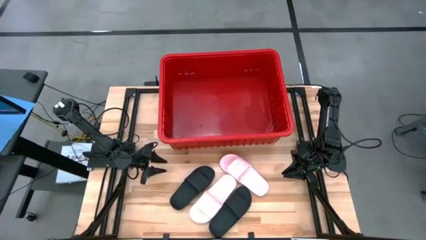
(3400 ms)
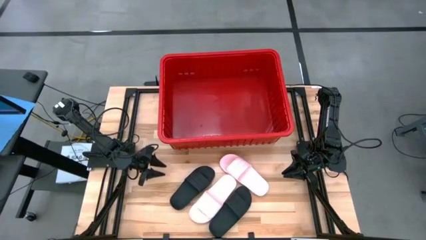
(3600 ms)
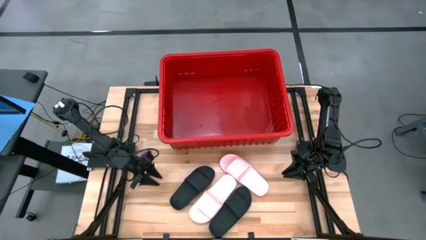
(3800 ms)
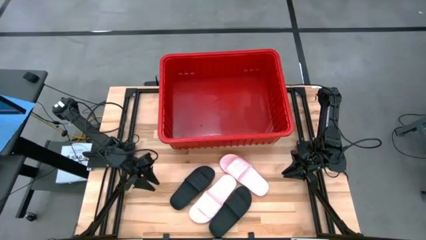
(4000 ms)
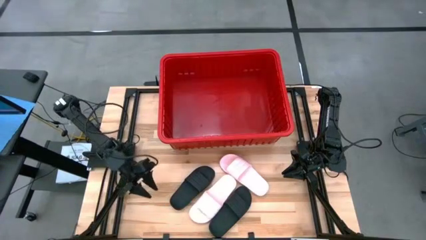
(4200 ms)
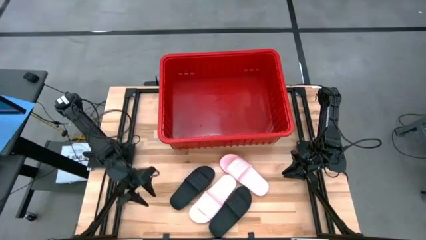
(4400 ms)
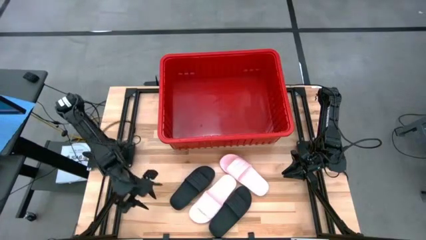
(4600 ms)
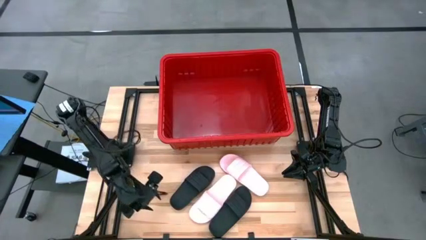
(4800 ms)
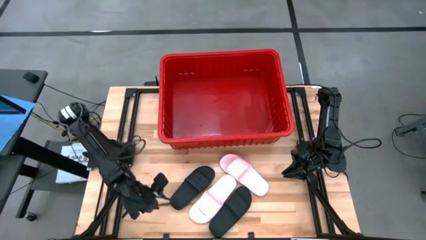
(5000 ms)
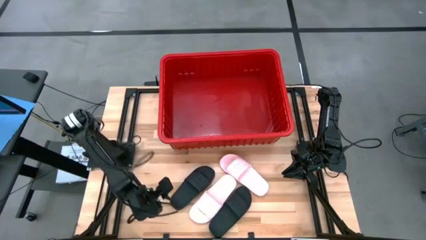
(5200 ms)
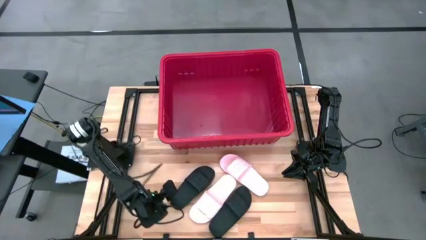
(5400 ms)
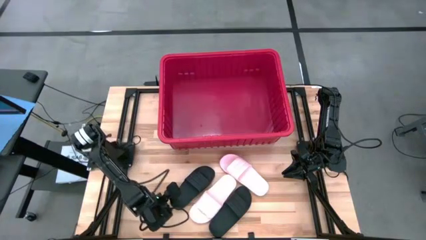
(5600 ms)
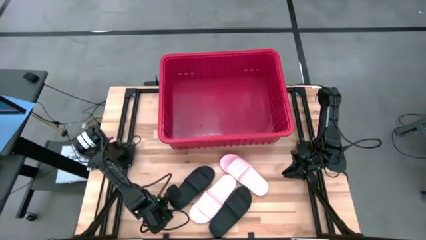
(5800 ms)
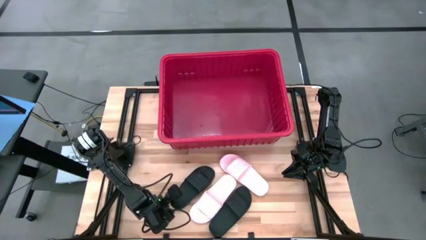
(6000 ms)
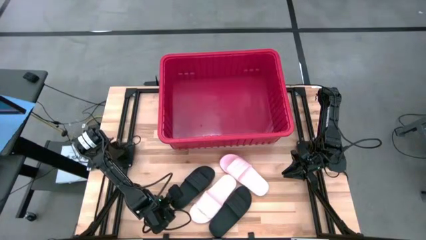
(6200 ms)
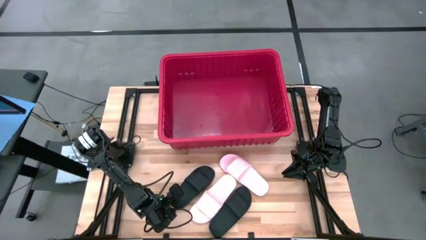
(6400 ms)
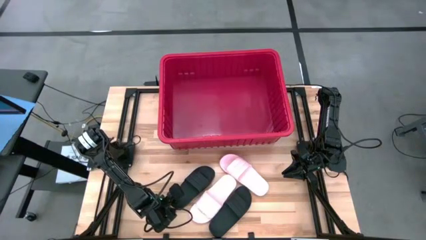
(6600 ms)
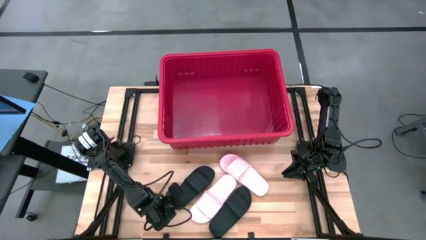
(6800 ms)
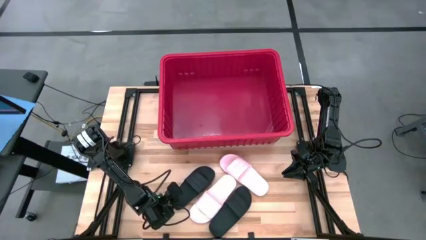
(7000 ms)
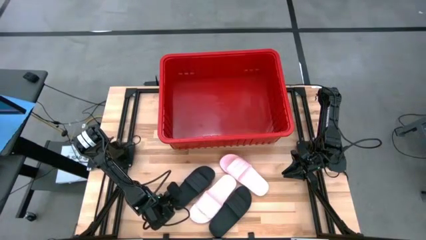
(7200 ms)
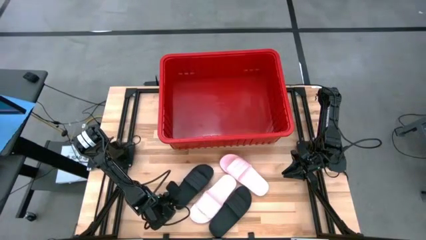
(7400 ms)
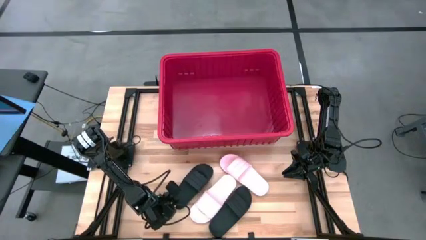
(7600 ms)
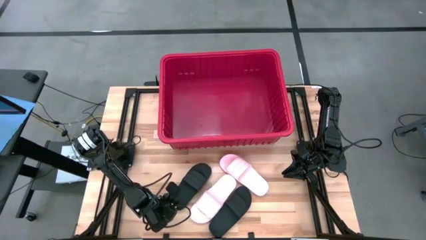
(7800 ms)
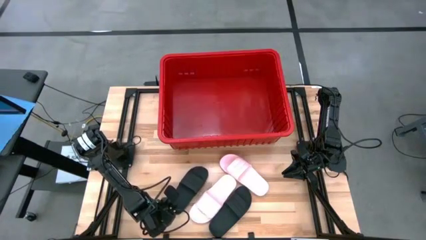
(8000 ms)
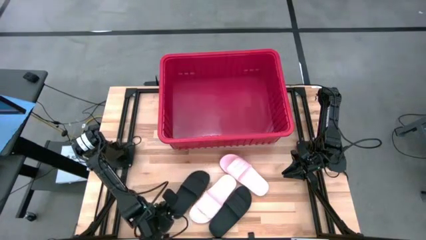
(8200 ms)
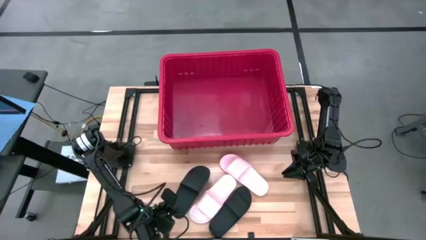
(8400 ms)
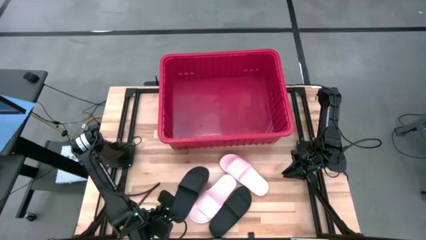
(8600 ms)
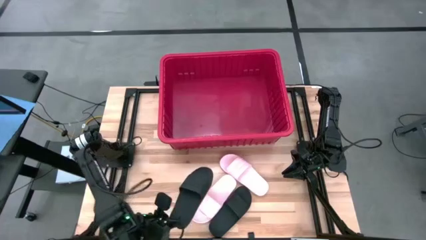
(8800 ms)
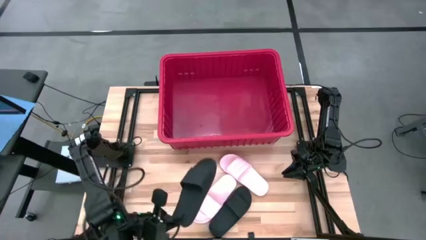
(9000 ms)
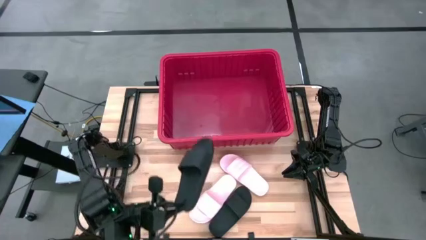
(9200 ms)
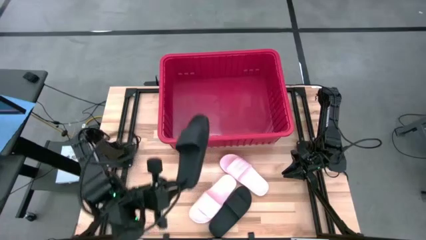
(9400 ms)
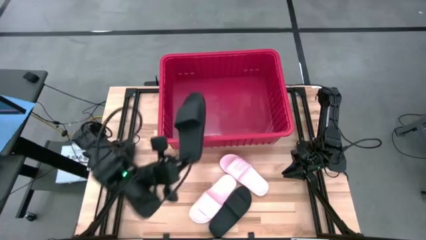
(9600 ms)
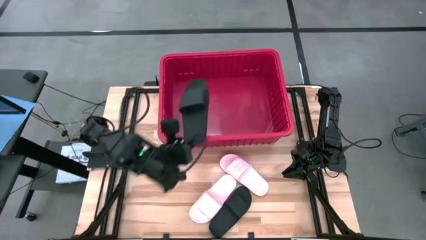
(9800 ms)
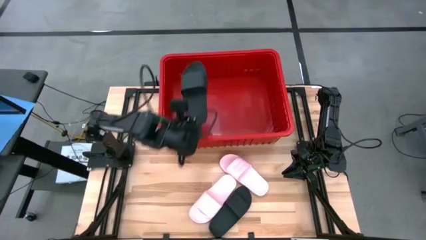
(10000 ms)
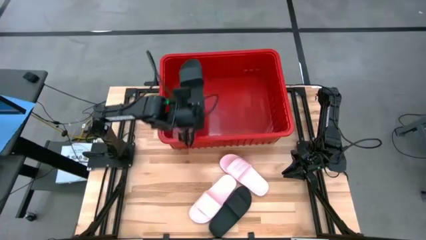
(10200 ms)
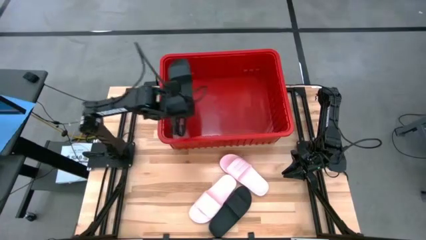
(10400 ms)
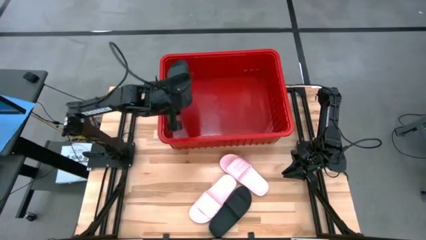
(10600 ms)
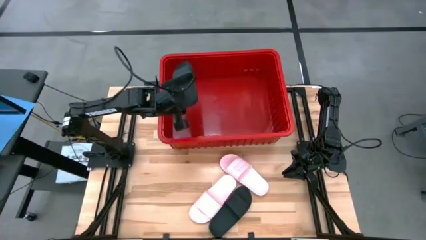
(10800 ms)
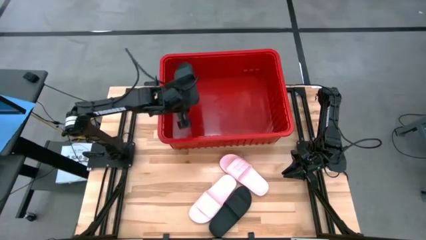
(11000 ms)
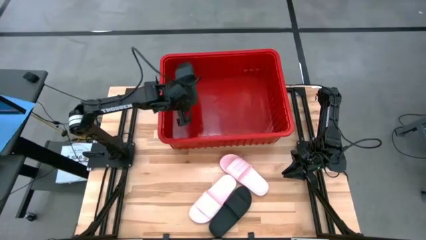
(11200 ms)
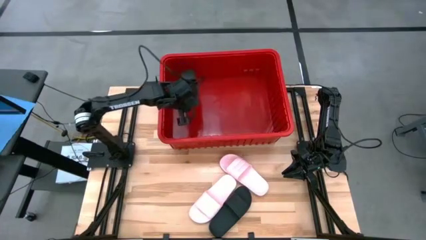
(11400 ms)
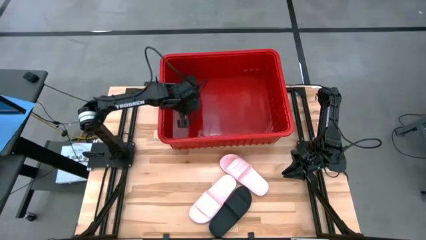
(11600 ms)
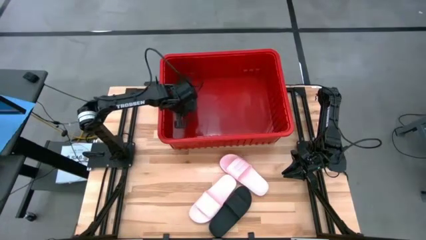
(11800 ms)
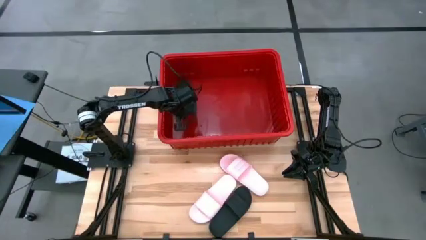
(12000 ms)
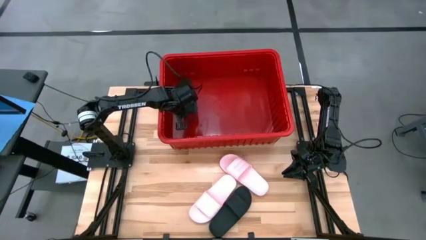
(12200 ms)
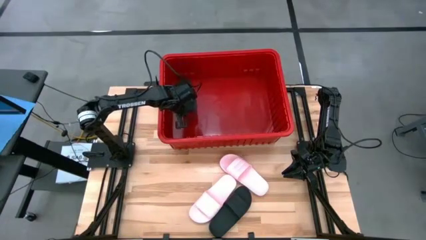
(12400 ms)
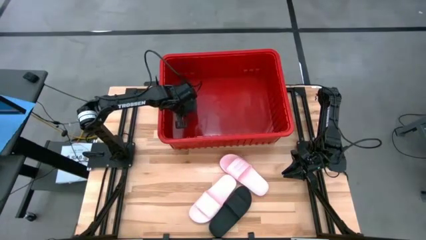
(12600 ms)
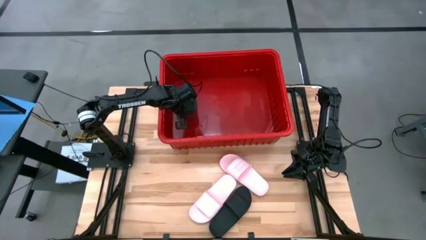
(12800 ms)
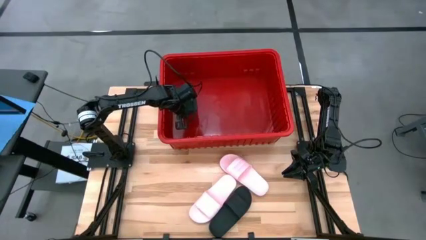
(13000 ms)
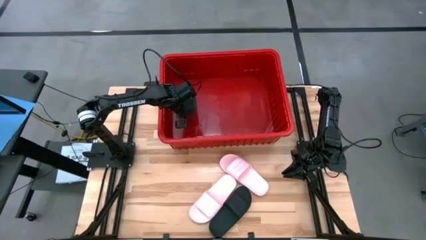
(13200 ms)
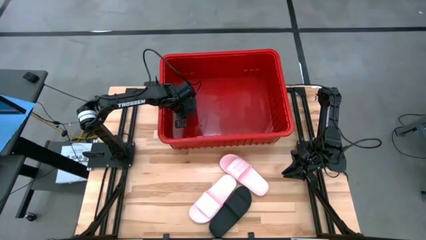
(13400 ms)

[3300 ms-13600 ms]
Task: Pick and place slides into bin
Put the left black slide into the basket

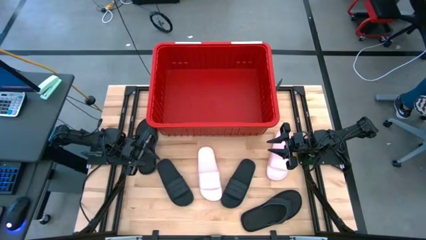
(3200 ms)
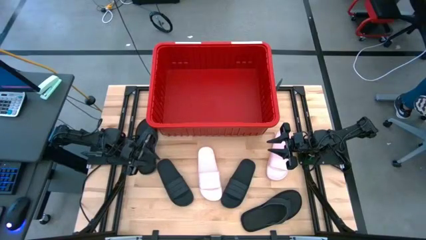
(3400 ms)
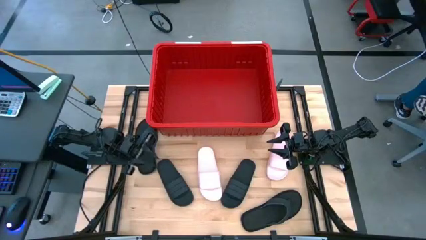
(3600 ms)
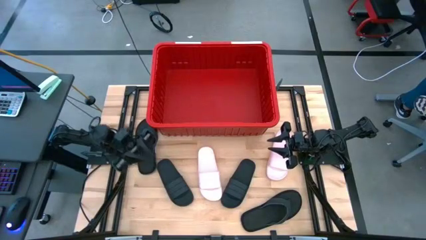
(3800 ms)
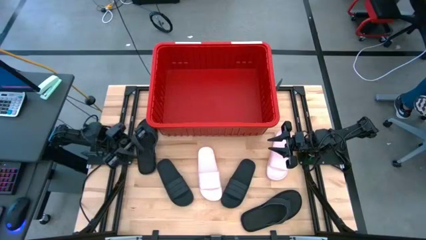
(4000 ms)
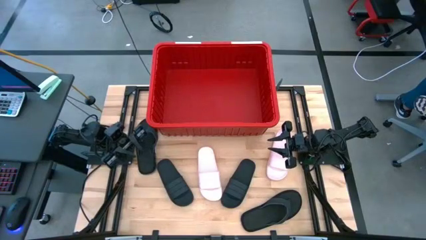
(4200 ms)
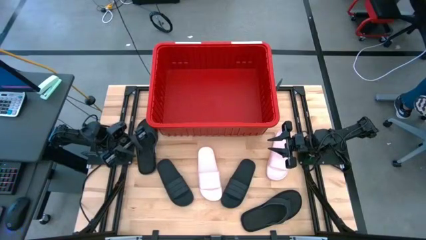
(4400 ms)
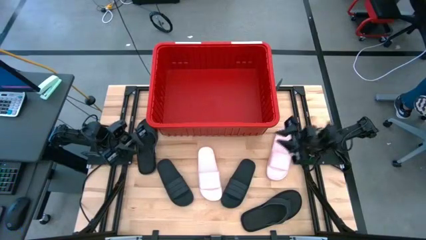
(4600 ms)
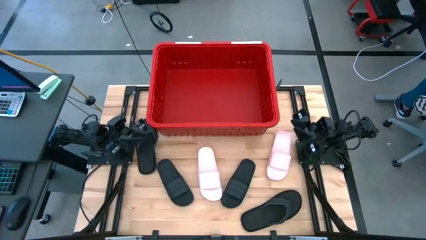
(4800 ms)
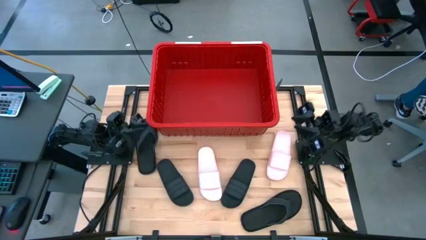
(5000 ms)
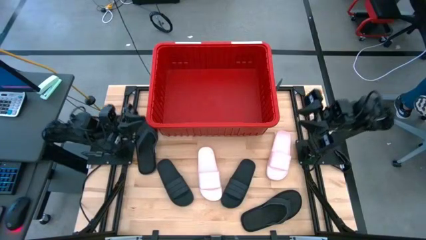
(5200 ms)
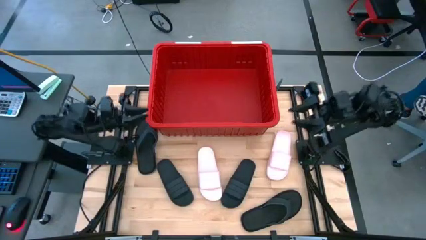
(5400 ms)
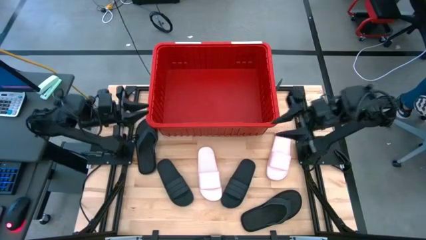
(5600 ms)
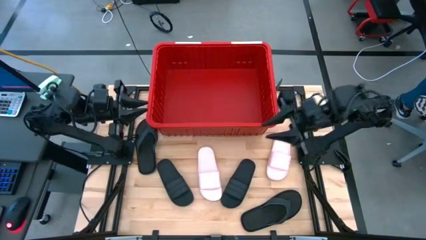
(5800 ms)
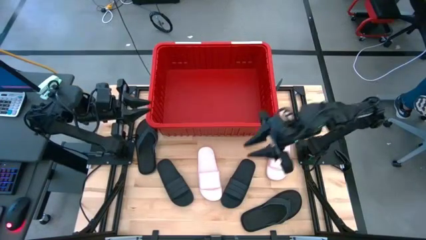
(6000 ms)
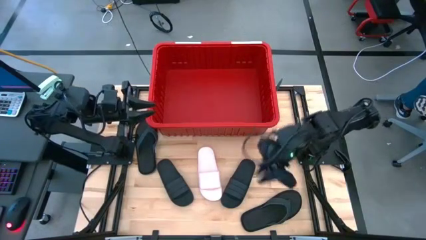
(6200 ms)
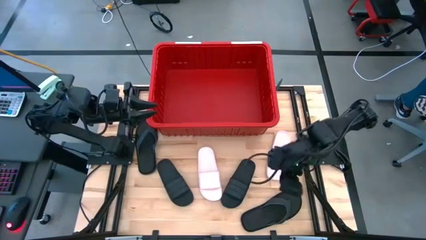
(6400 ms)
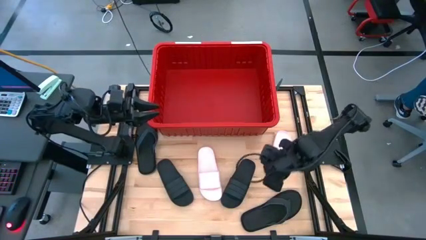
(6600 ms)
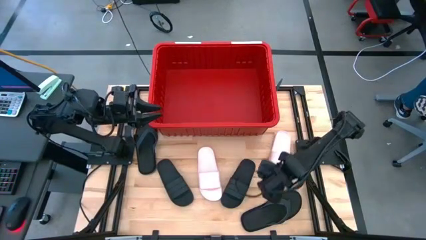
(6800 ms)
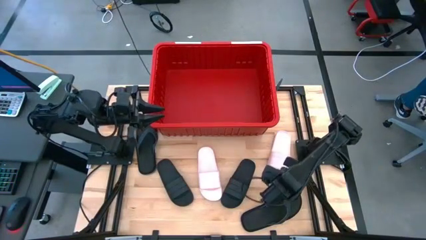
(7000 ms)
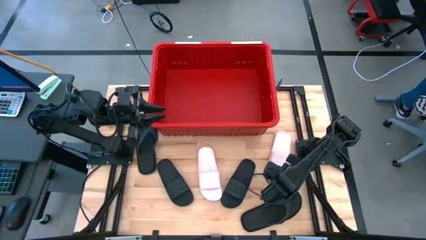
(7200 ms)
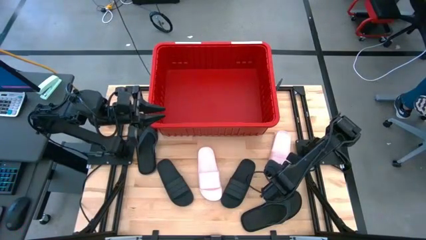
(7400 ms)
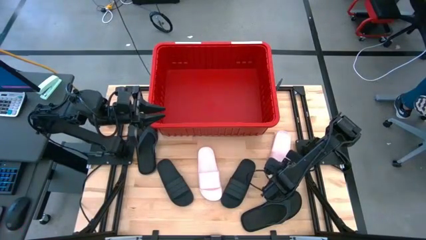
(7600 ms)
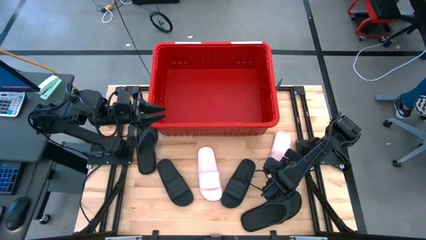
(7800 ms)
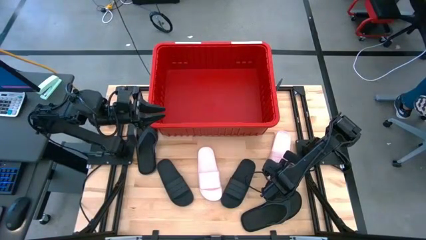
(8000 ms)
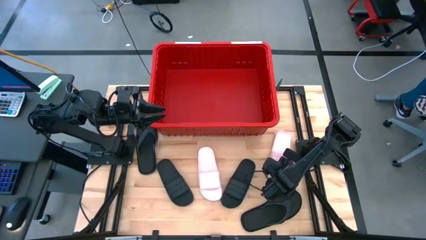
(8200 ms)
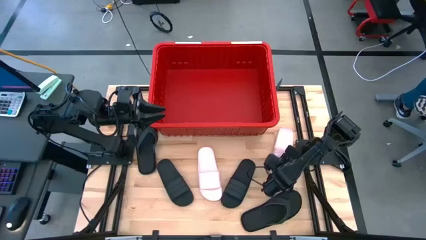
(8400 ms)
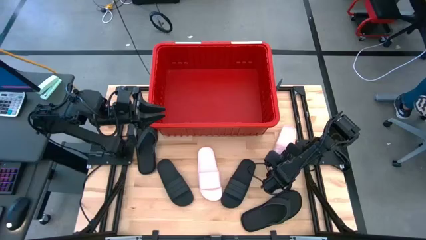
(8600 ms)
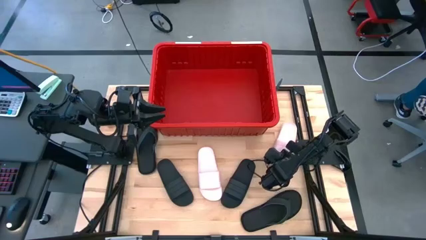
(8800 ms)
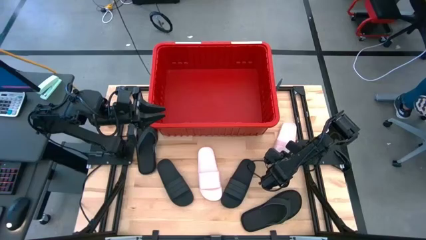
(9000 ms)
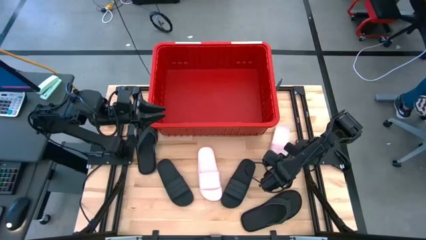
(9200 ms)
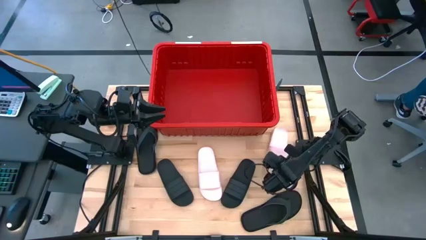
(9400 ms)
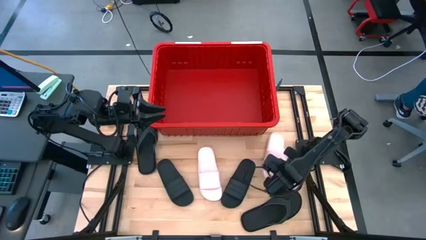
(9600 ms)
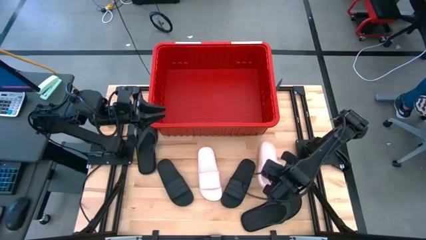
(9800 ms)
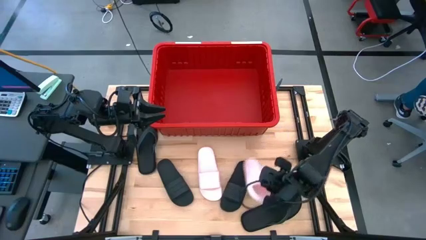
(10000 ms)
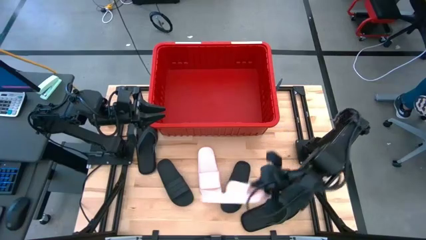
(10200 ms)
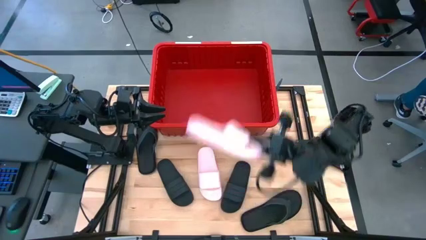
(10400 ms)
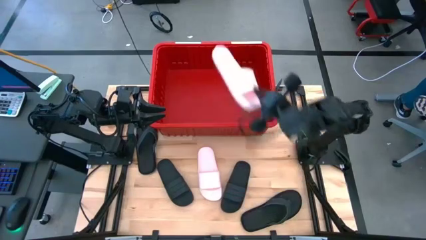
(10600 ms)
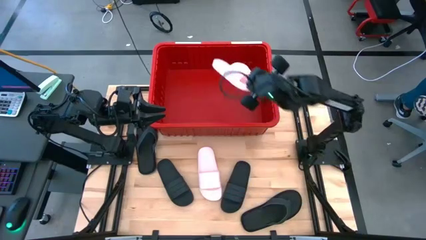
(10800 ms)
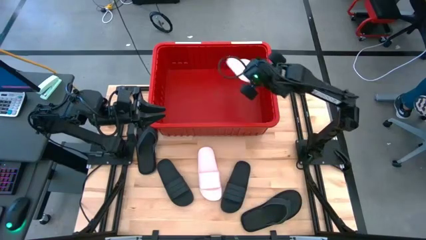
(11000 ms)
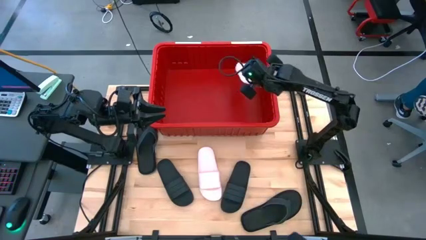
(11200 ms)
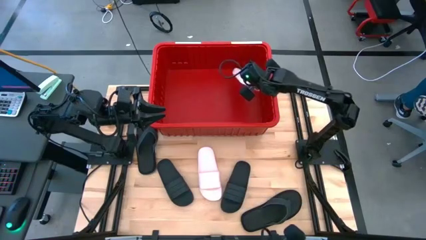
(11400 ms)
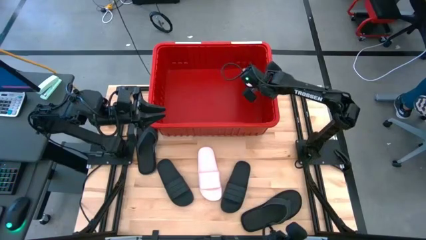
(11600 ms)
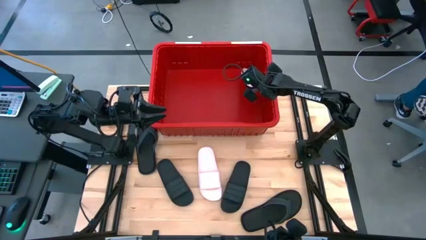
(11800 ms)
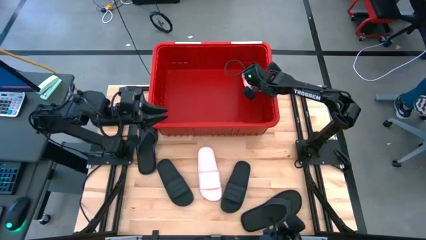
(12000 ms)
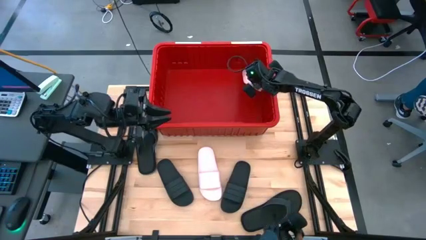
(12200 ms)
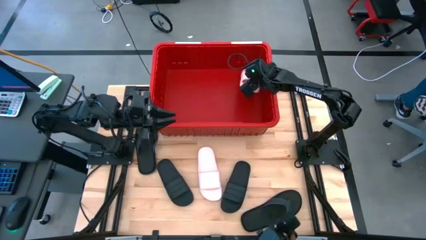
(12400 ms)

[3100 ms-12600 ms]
Task: Pick and place slides into bin
Put the right pink slide into the red bin
